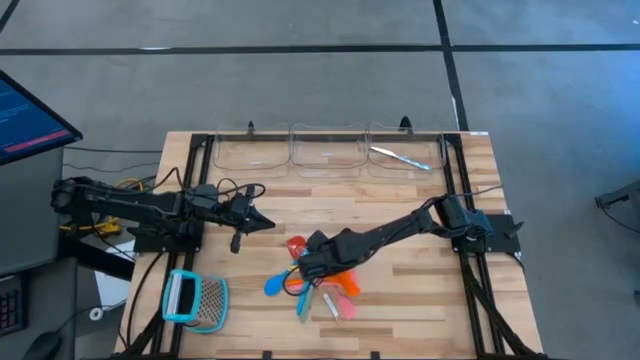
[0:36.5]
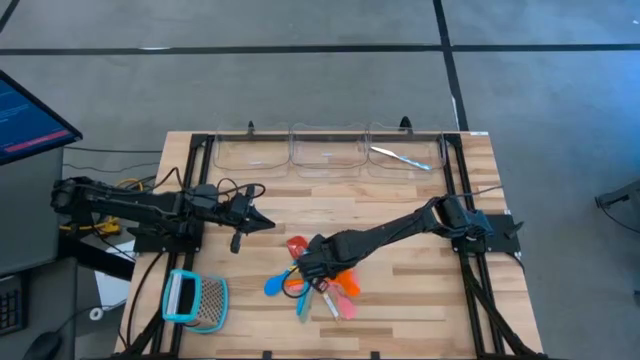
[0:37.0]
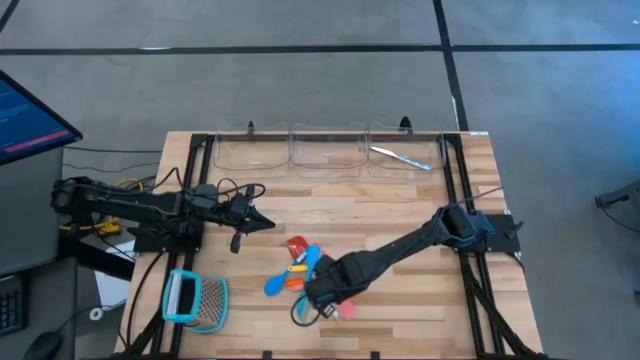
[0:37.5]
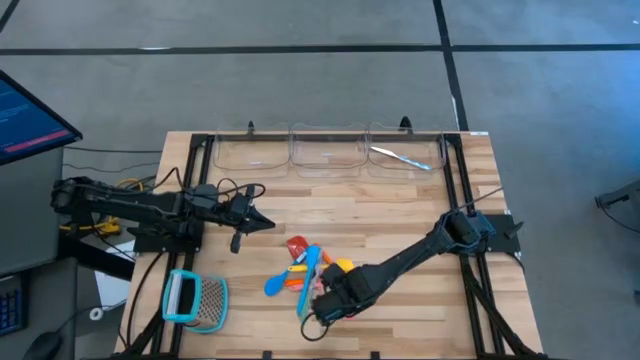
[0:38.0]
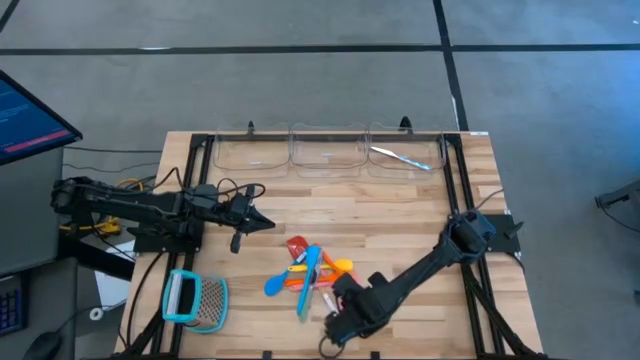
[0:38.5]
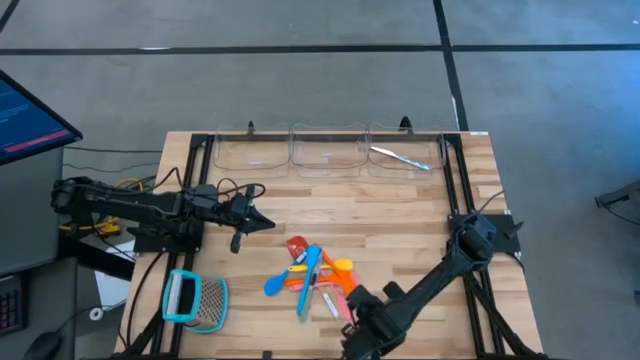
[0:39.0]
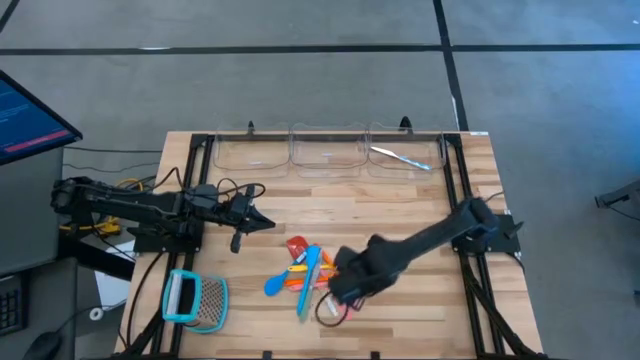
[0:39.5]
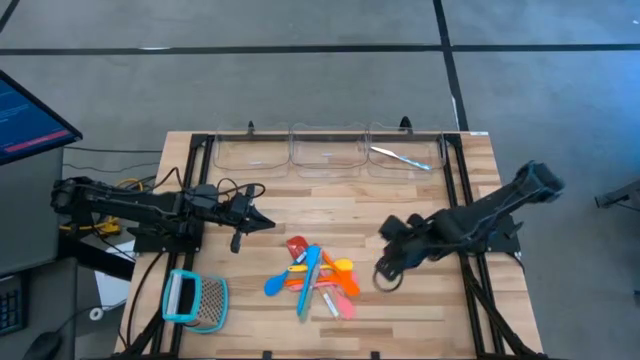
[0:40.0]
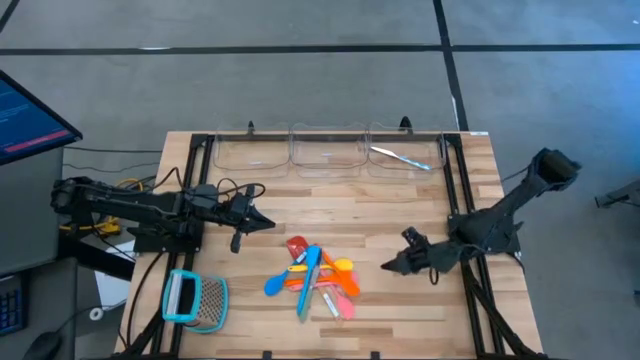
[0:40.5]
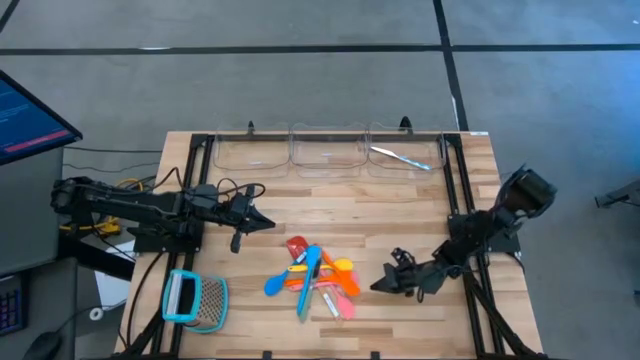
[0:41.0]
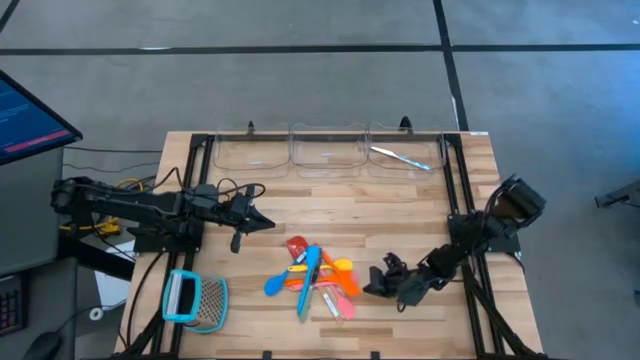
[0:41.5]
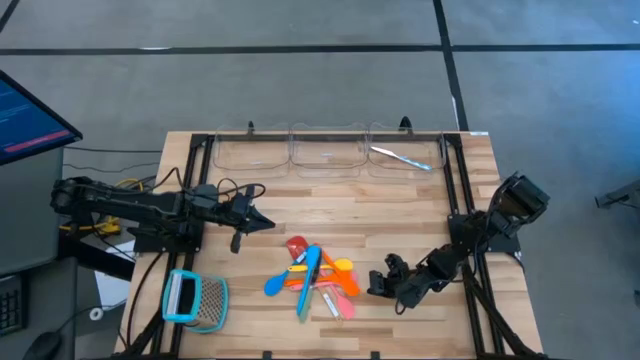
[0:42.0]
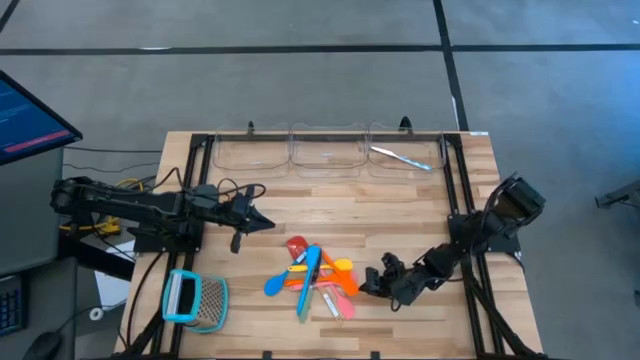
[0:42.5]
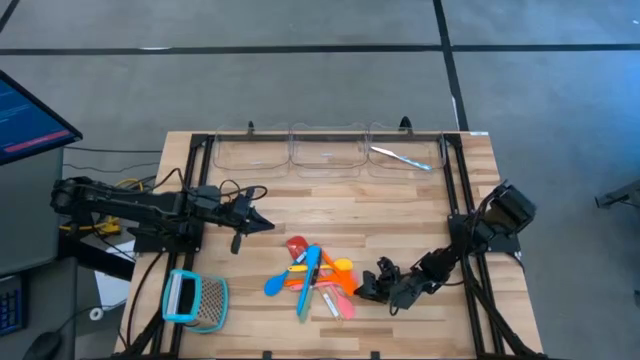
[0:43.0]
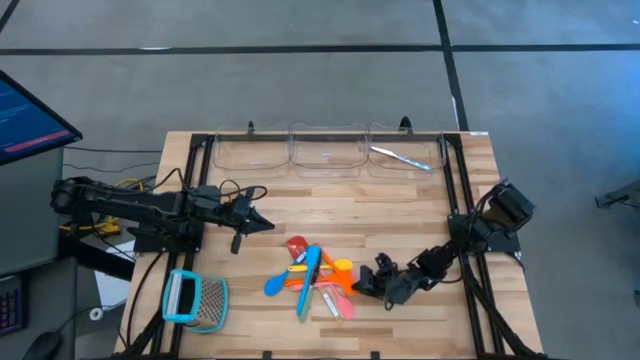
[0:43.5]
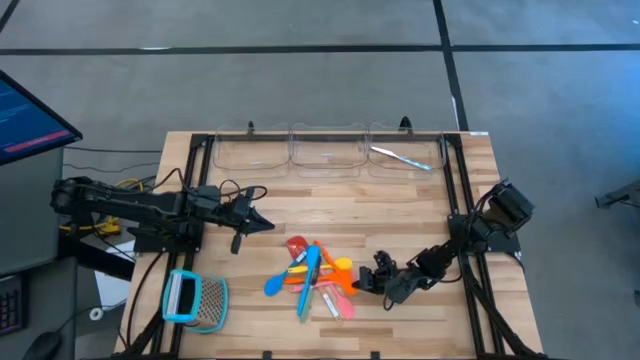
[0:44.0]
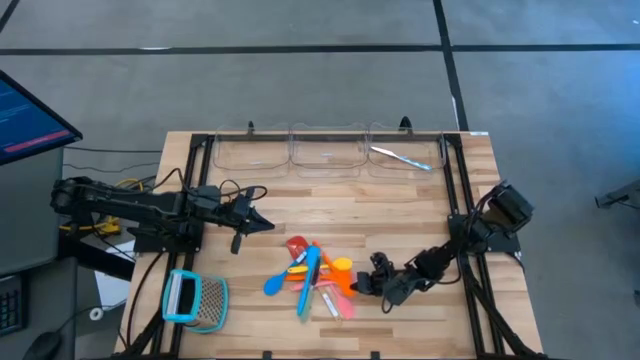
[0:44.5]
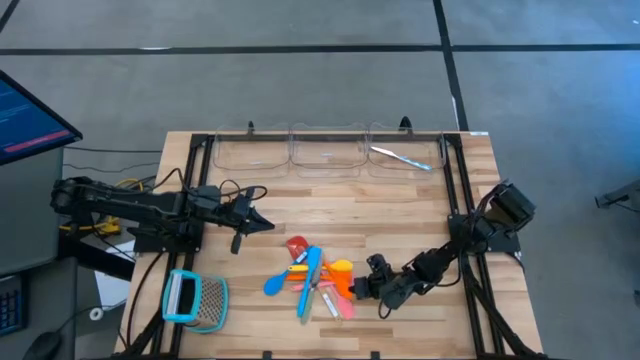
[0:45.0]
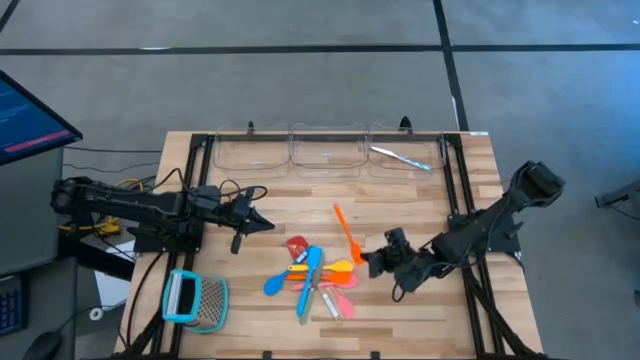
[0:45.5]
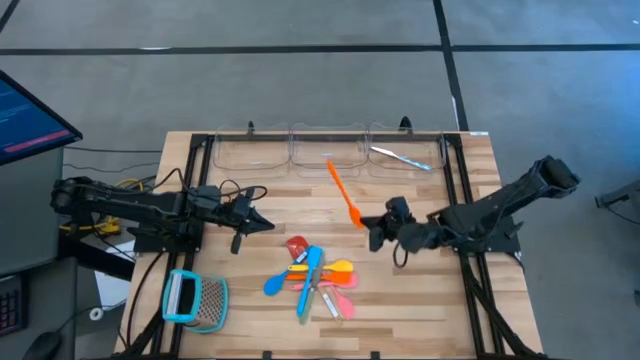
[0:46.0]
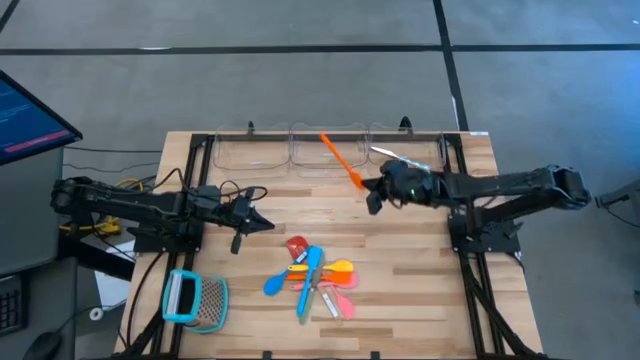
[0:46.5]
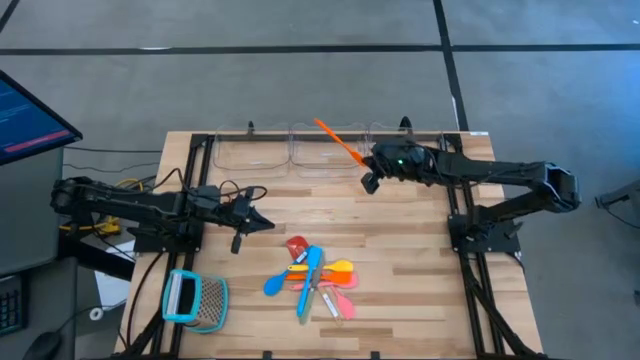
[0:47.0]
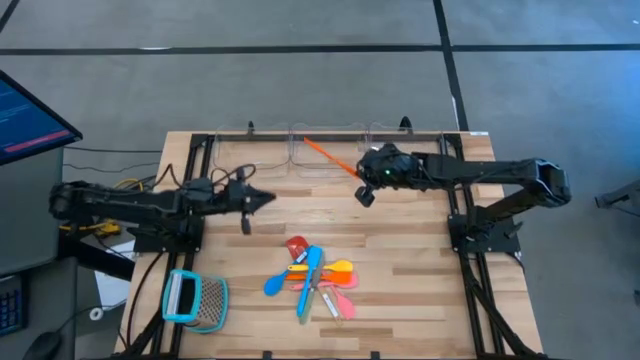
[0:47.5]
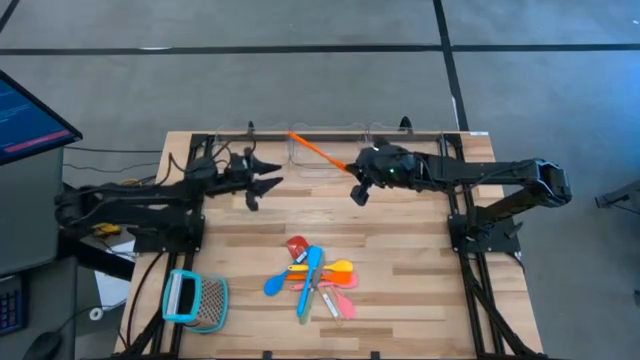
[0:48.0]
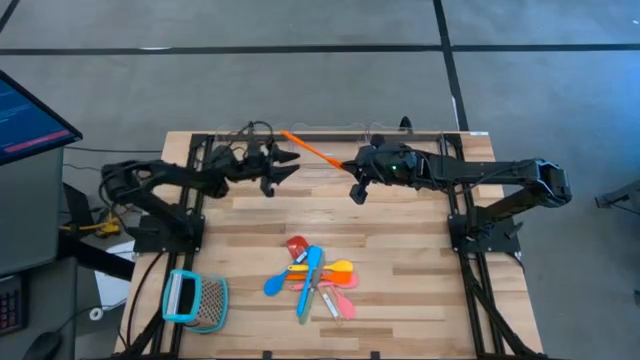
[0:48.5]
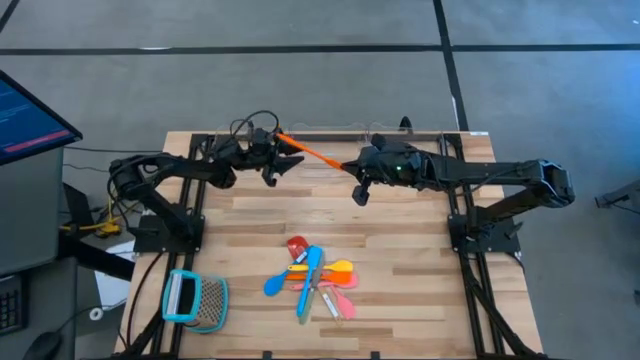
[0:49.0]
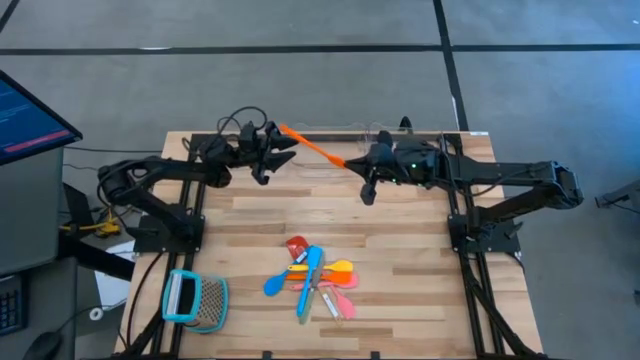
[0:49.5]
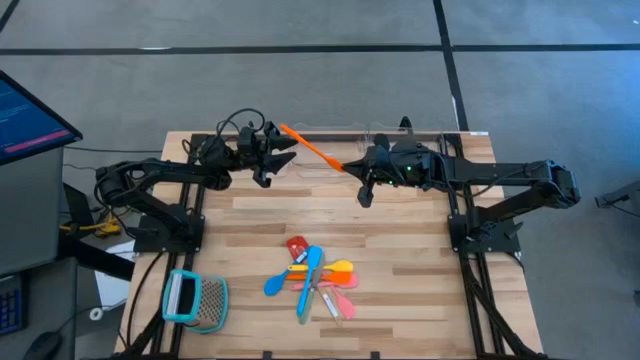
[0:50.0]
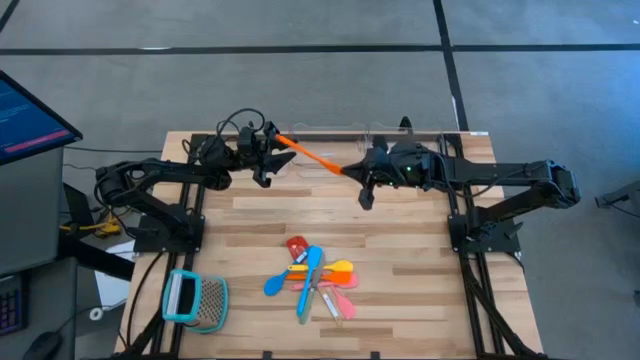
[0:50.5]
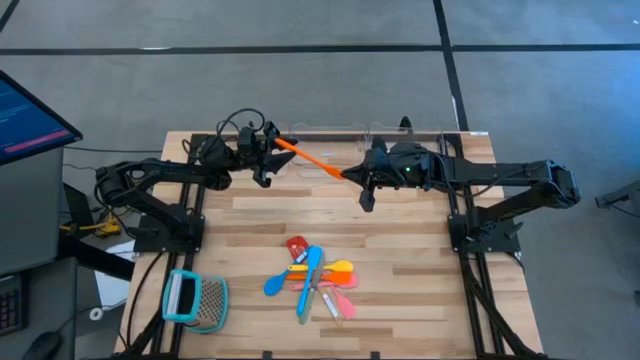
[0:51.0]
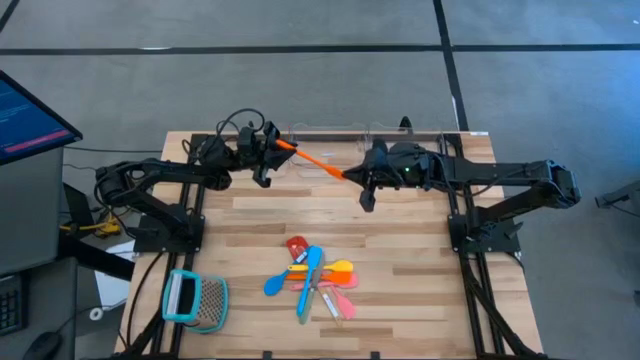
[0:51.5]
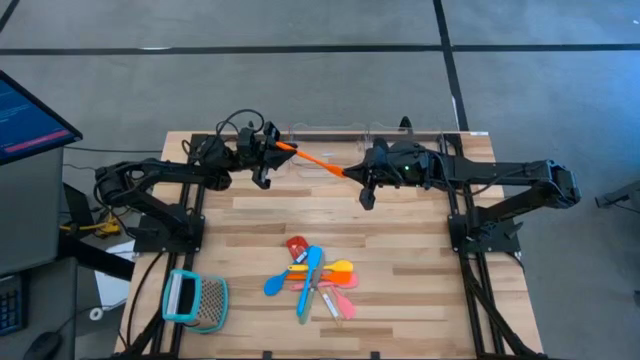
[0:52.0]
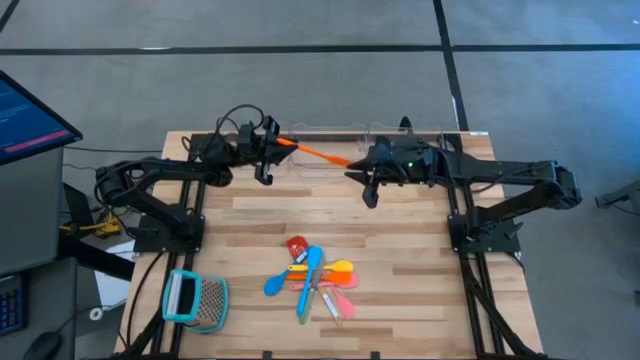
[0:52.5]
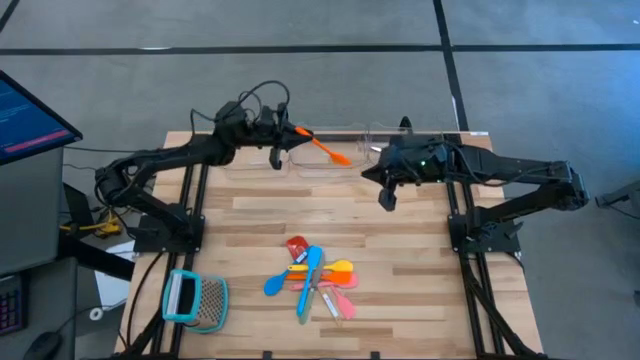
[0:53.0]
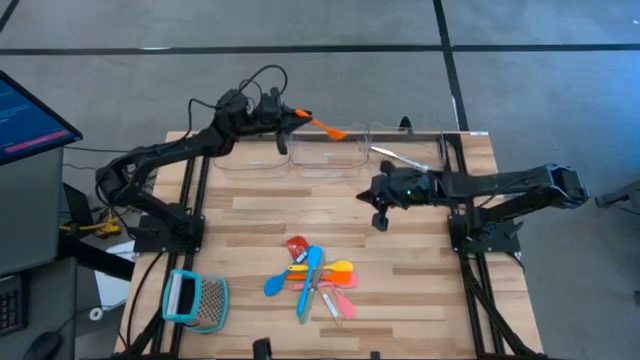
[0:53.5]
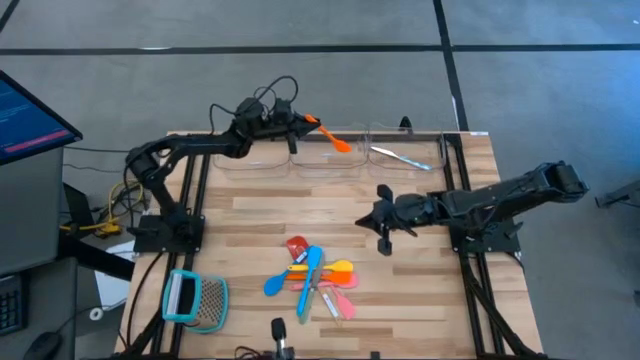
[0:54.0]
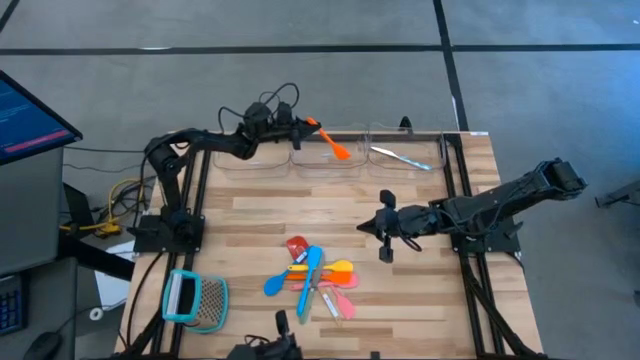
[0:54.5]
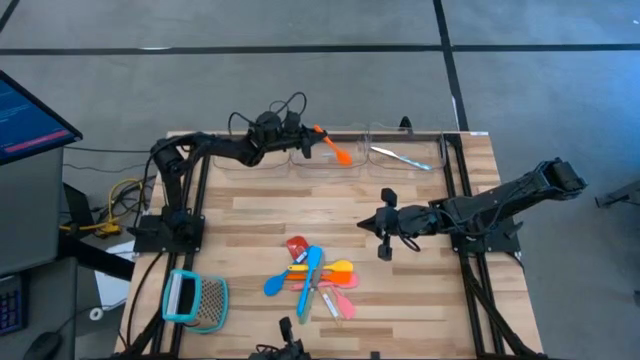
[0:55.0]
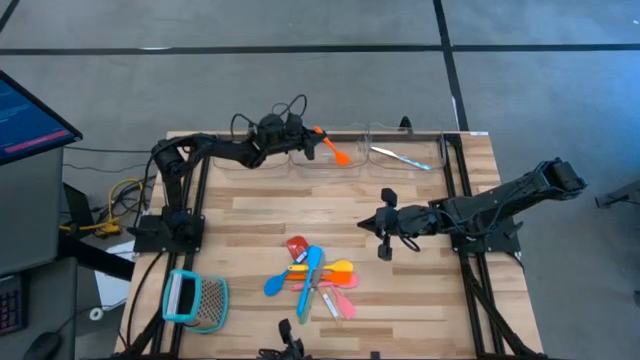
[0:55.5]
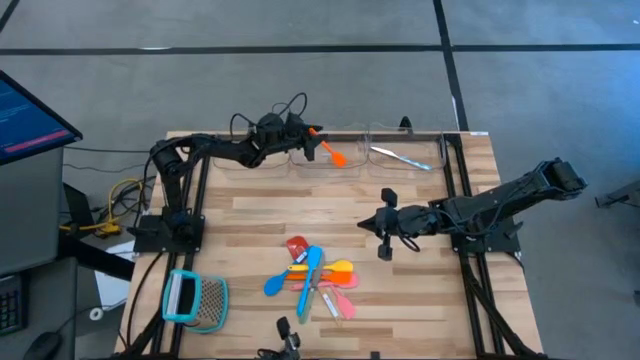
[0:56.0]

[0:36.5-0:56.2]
Task: Pick & Place Kitchen Items
Put the right orange spatula into the middle transparent bin
